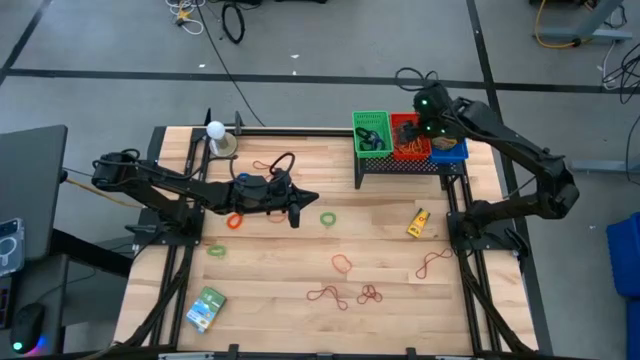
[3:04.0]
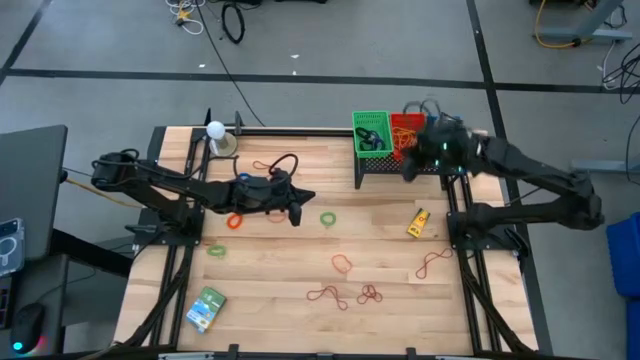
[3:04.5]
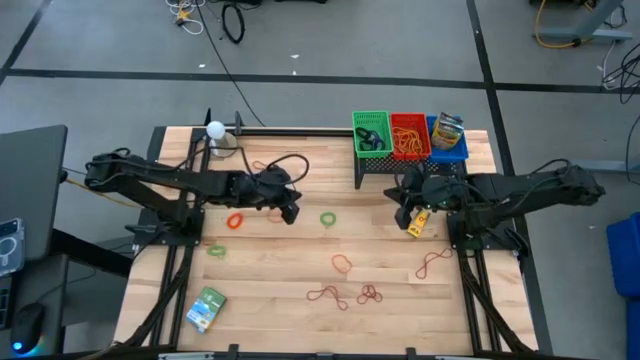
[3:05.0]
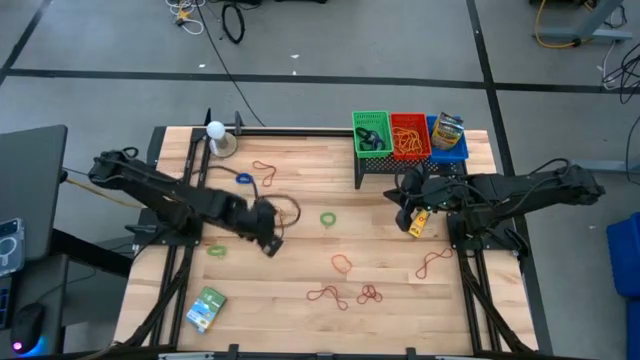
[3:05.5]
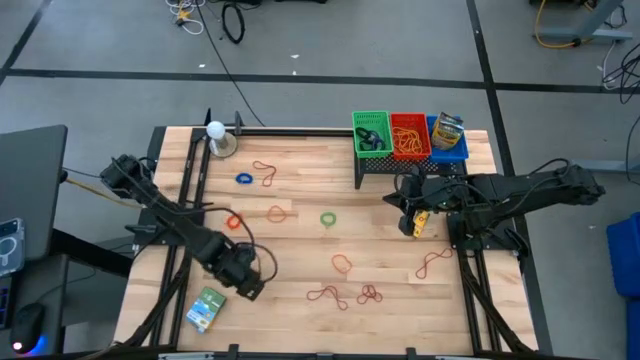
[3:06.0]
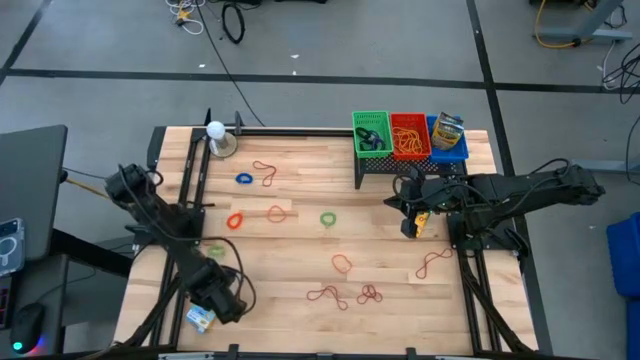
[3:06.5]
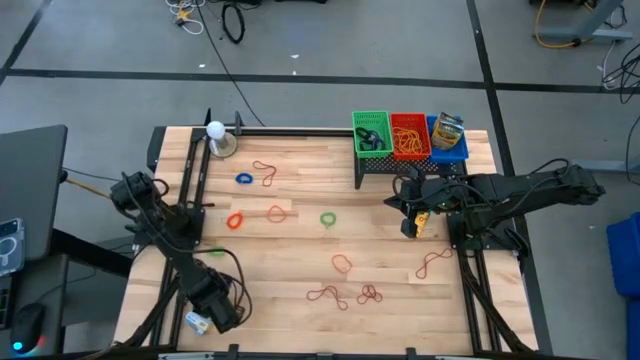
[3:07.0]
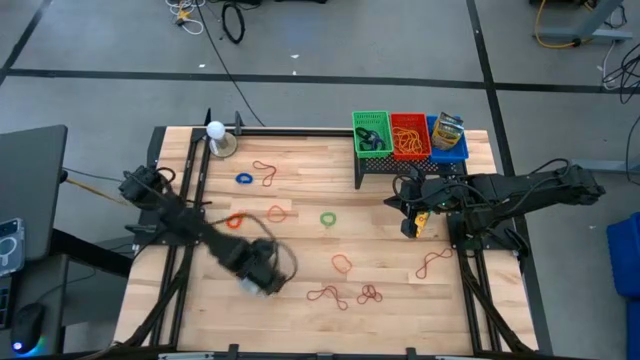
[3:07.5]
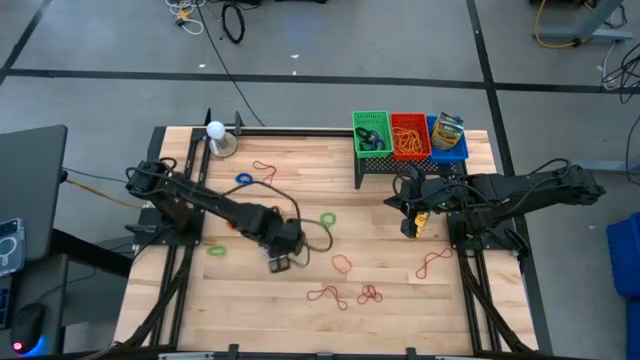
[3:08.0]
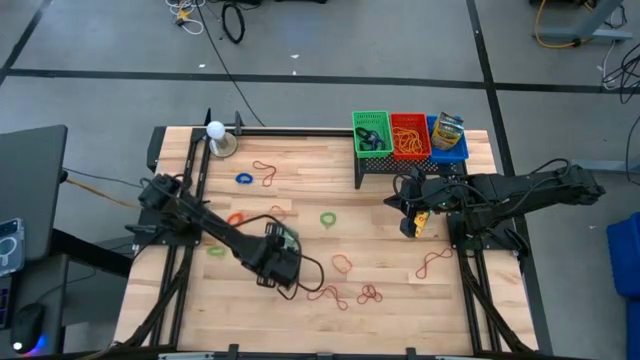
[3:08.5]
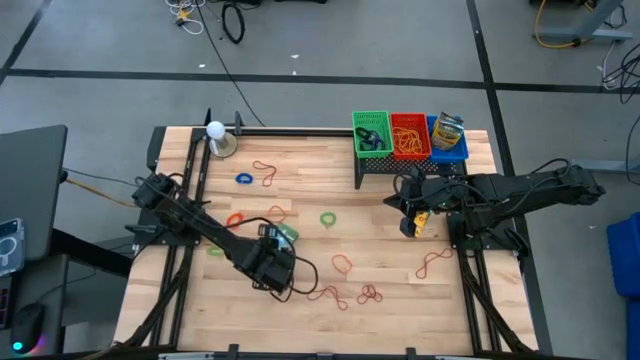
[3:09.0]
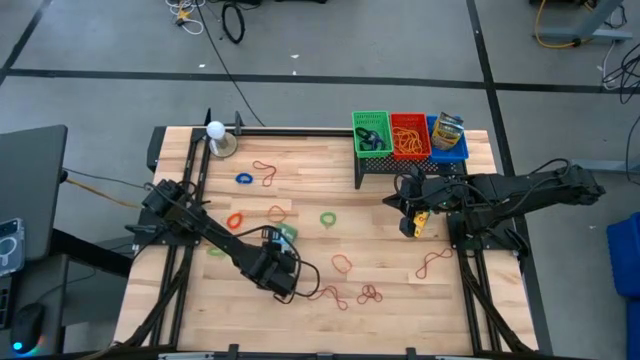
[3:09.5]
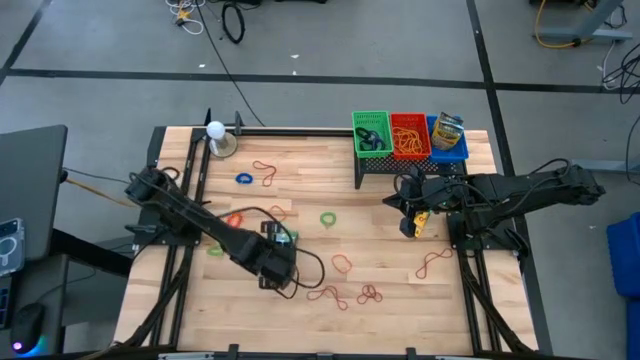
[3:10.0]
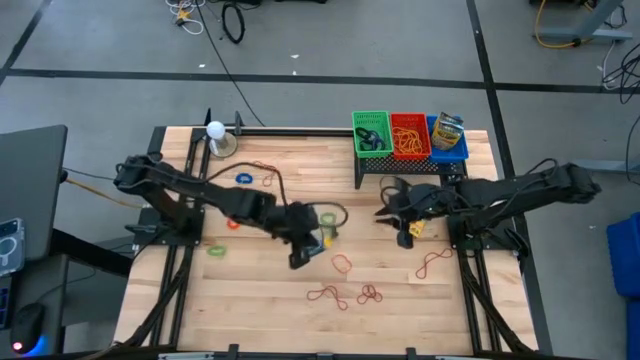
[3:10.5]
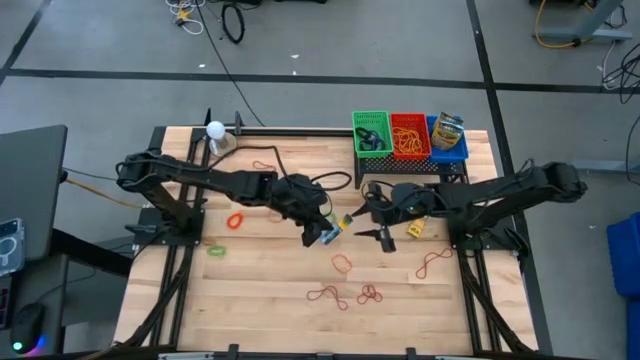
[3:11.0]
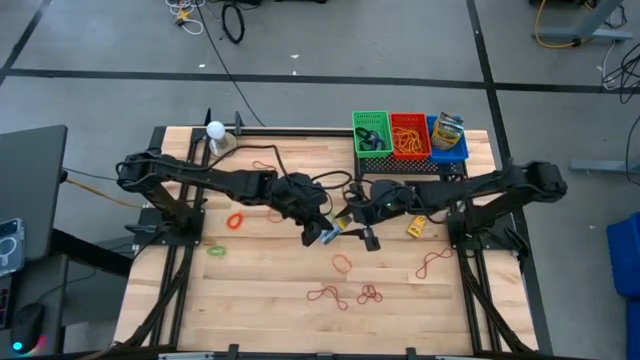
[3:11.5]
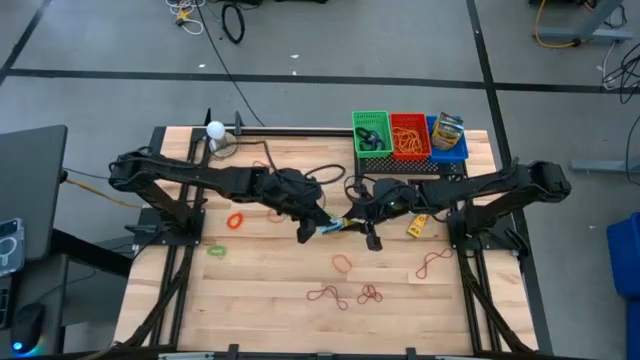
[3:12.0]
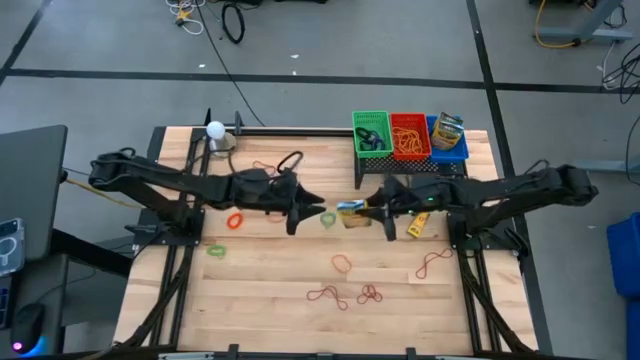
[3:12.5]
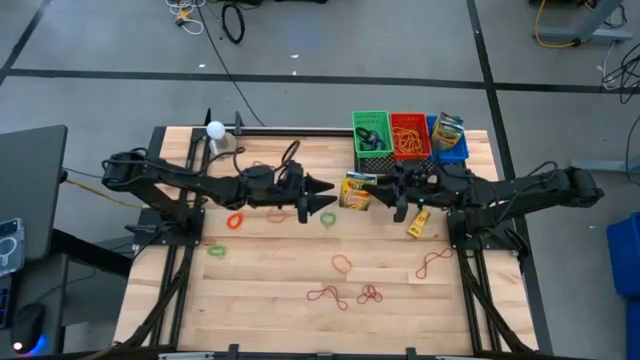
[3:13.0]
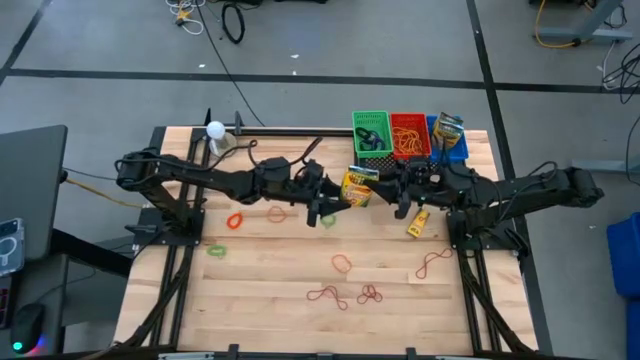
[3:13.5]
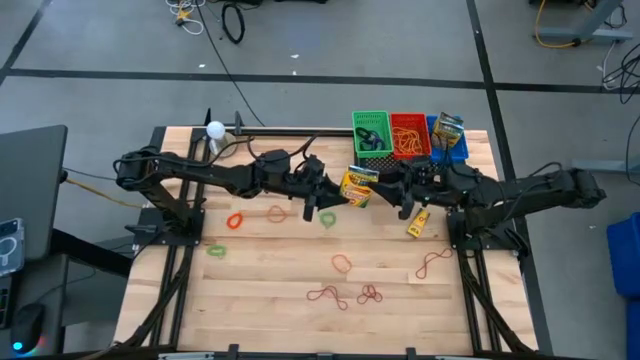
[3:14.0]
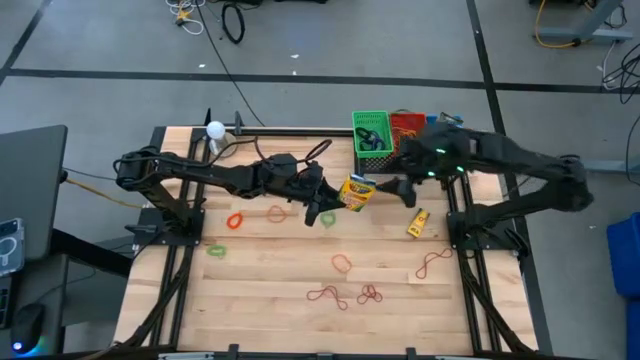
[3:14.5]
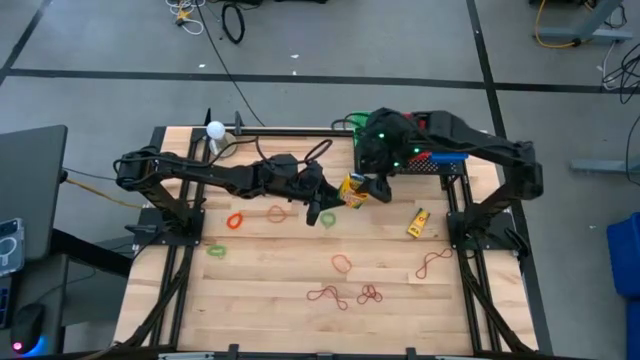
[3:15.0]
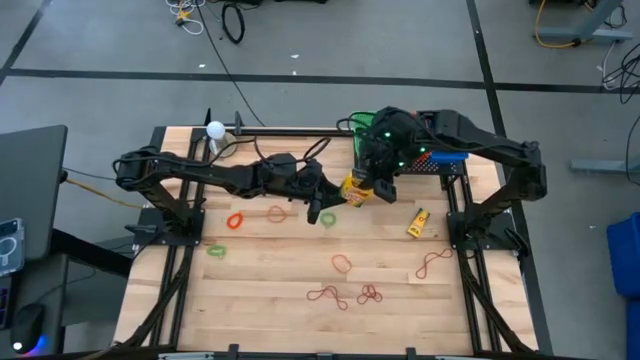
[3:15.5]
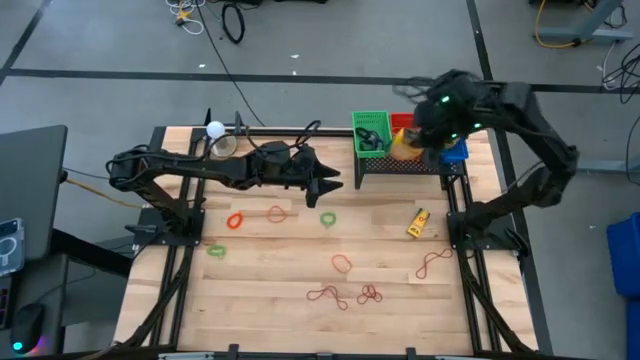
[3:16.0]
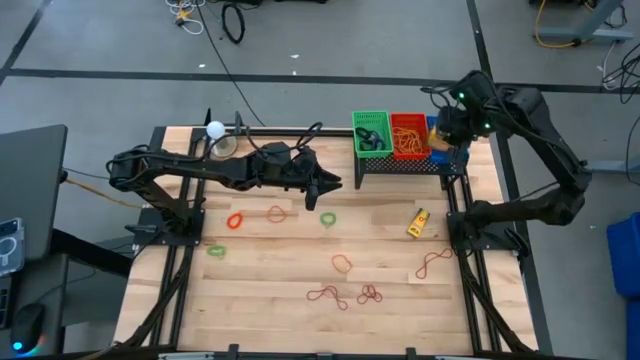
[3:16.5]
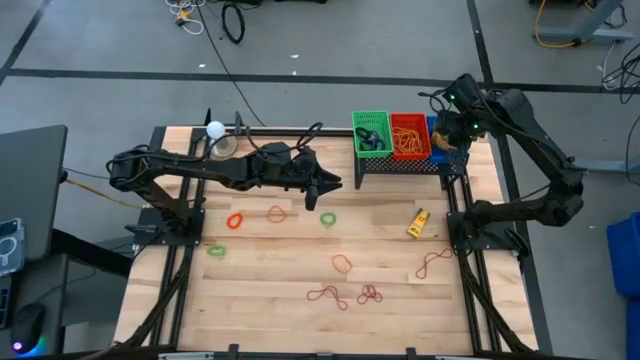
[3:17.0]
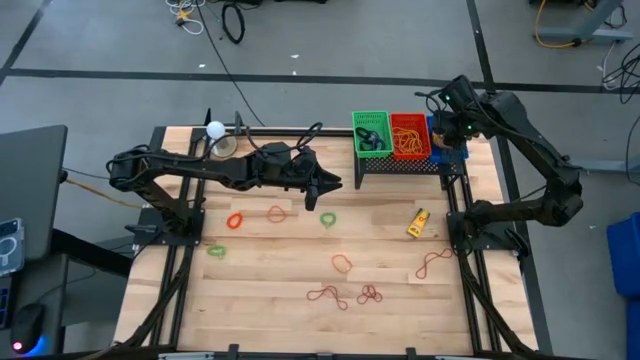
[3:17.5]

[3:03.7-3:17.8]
Task: Pick & Place Office Desk Supplies
Put the large crayon box into the blue bin

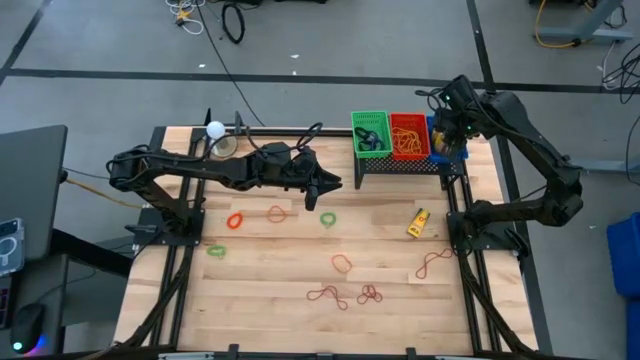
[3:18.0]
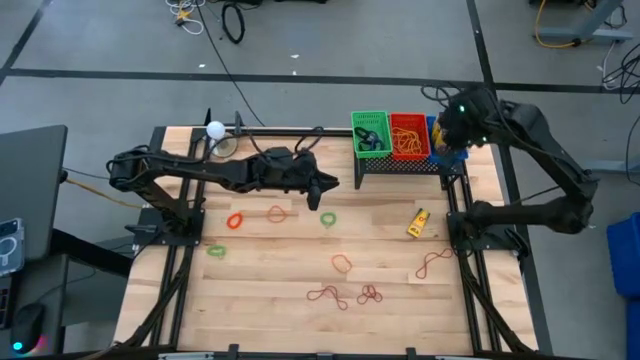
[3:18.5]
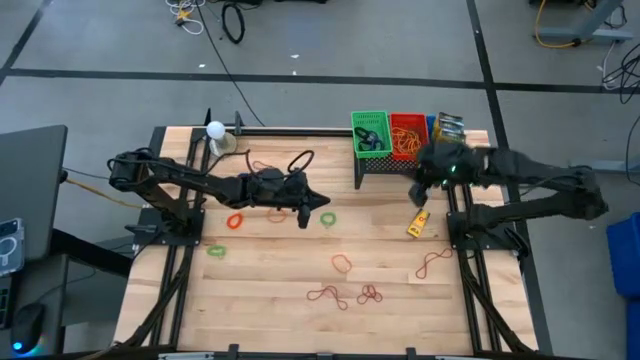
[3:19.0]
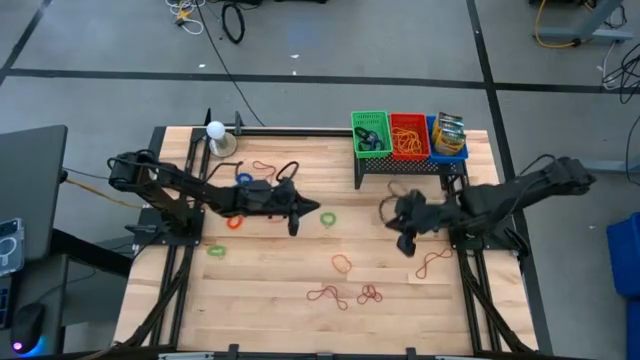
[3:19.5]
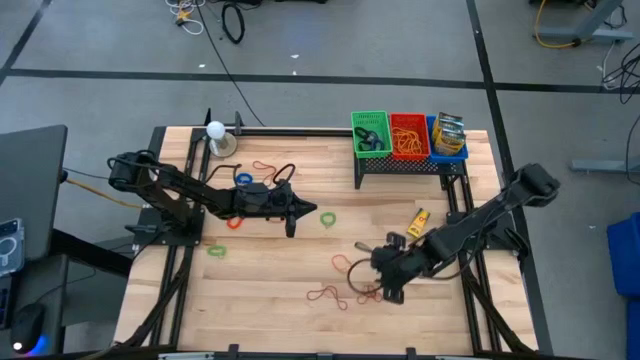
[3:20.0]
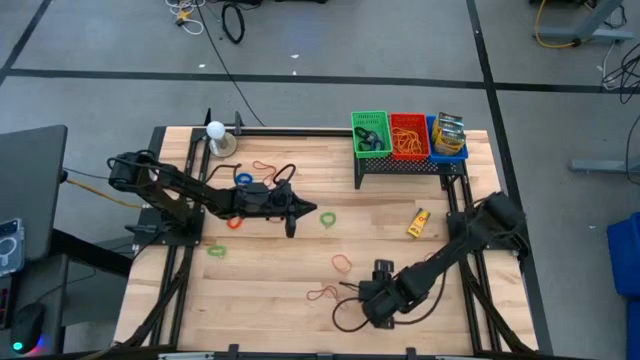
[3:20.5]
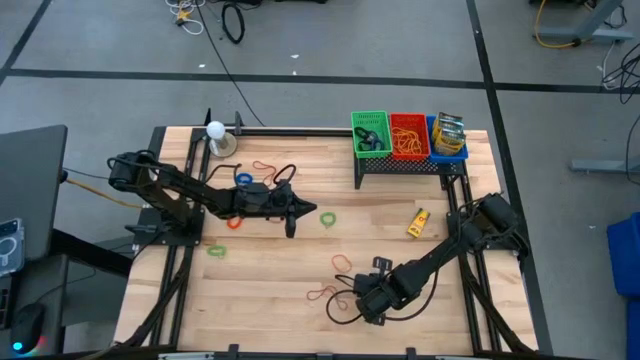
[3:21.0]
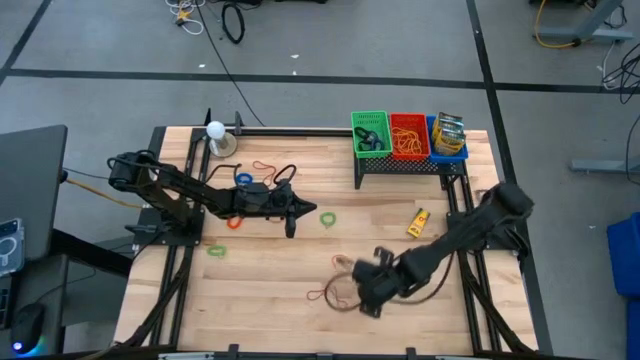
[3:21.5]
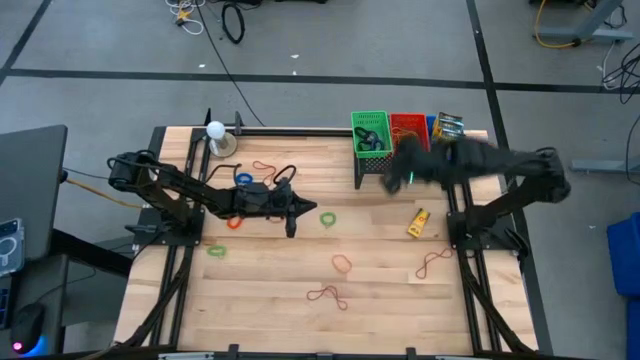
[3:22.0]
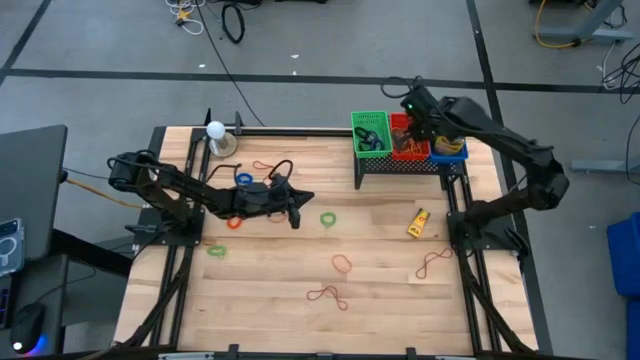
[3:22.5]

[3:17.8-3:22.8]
Put the red rubber band into the red bin

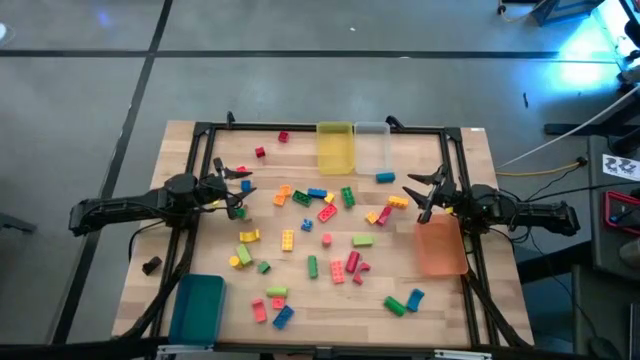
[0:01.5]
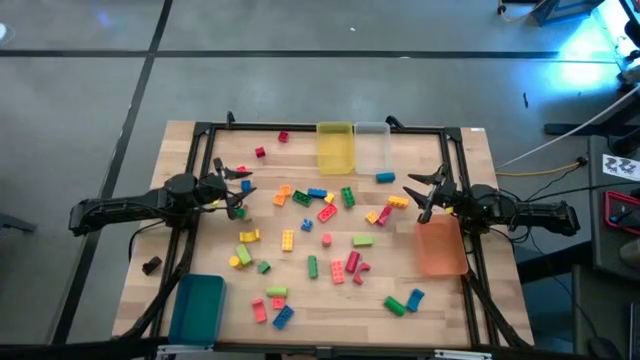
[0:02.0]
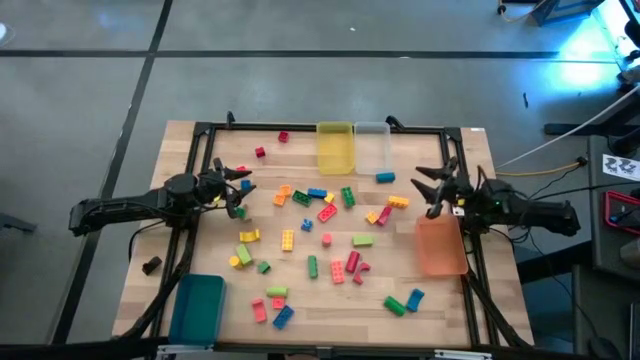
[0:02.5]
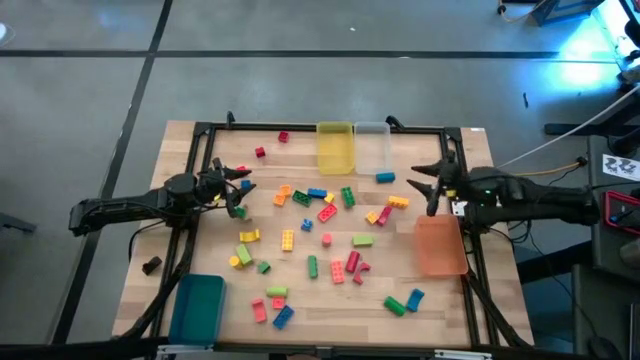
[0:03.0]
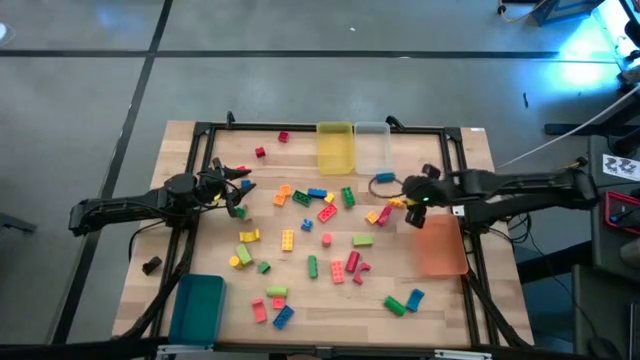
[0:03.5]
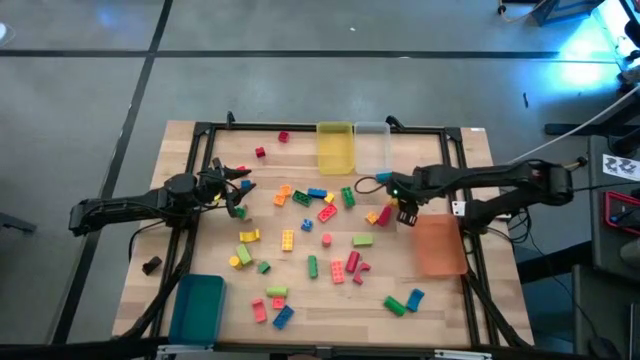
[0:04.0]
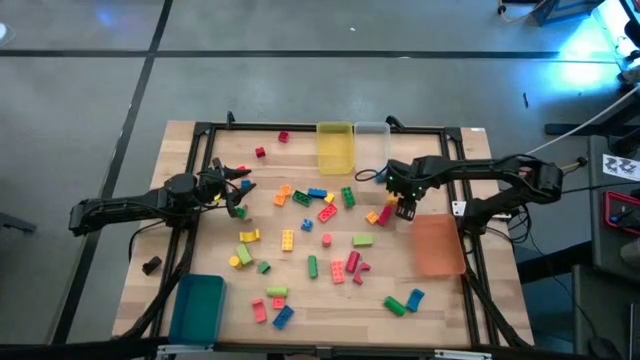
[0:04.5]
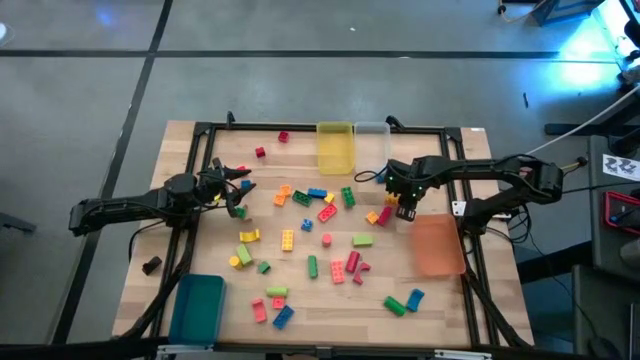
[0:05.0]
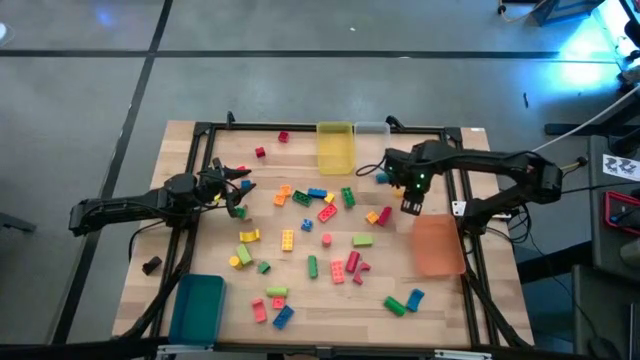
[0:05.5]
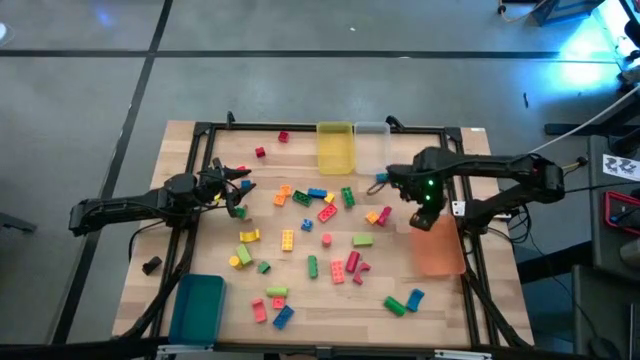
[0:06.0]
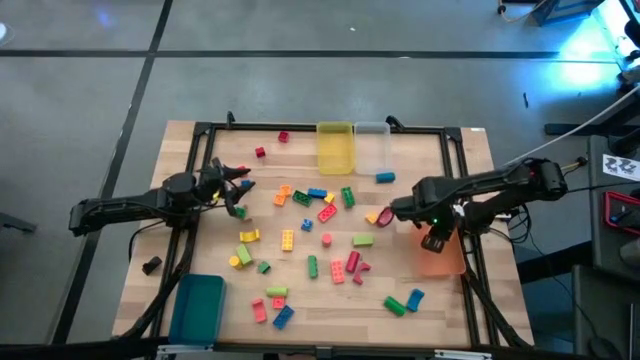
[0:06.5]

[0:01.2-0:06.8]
Task: Sort blocks by size
Put the yellow rectangular game piece into the orange bin
